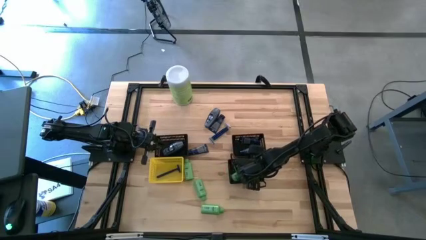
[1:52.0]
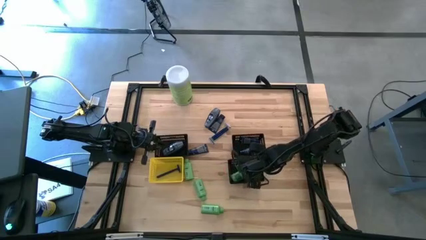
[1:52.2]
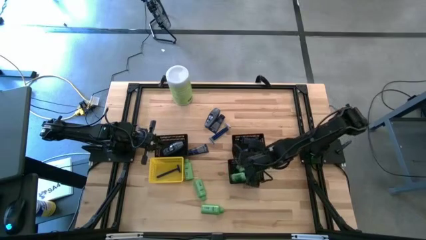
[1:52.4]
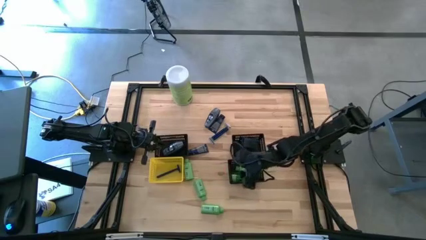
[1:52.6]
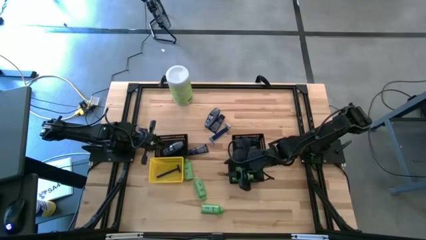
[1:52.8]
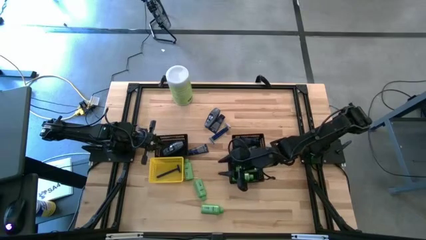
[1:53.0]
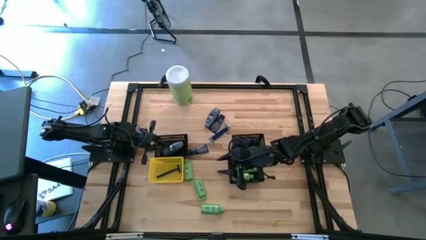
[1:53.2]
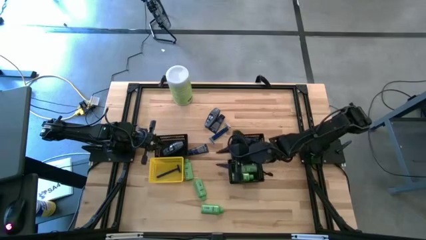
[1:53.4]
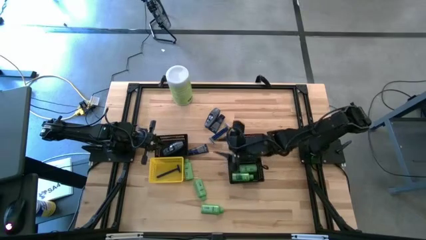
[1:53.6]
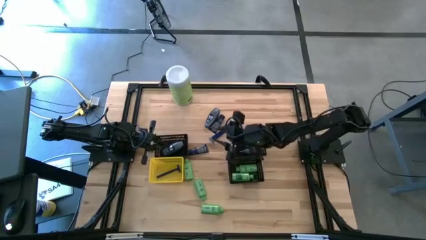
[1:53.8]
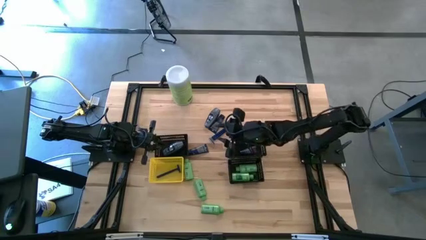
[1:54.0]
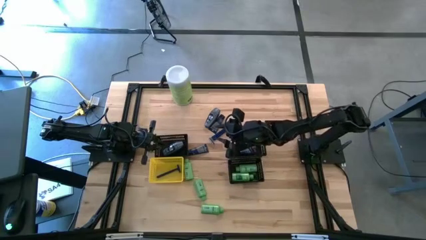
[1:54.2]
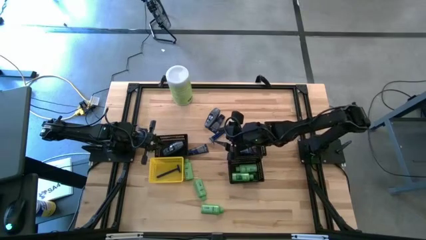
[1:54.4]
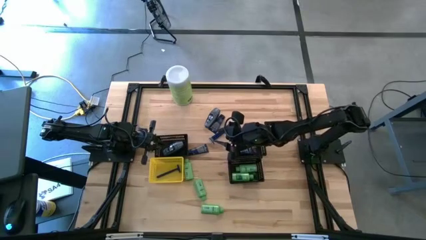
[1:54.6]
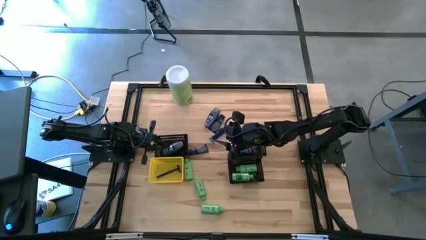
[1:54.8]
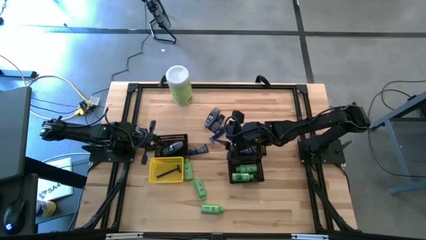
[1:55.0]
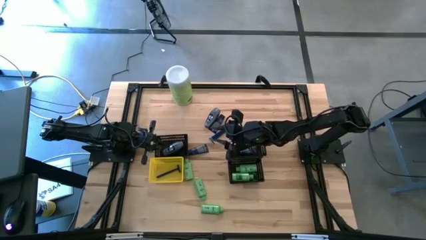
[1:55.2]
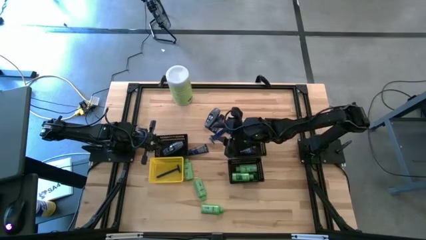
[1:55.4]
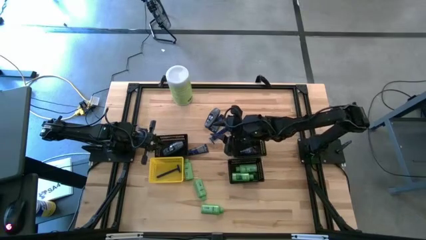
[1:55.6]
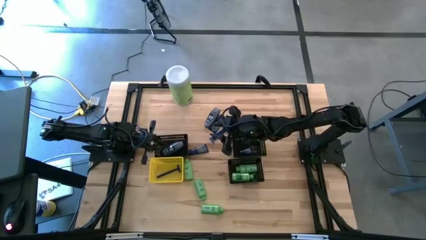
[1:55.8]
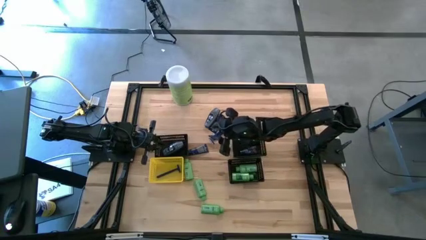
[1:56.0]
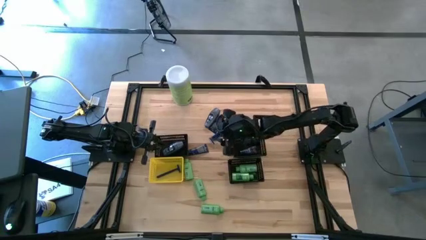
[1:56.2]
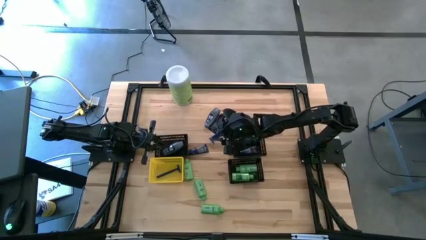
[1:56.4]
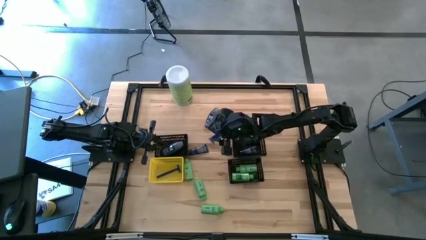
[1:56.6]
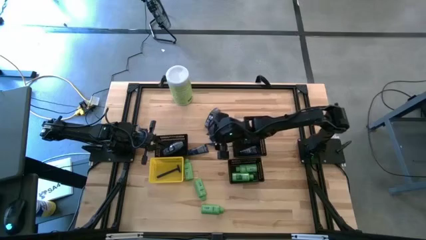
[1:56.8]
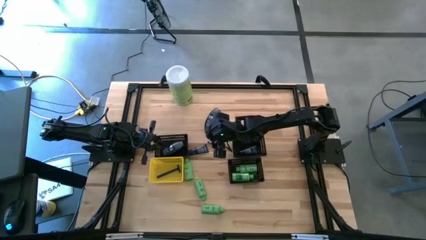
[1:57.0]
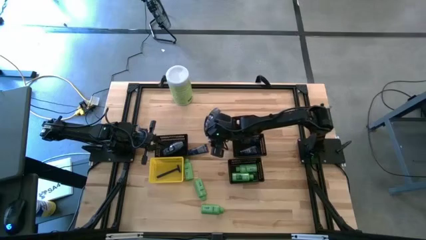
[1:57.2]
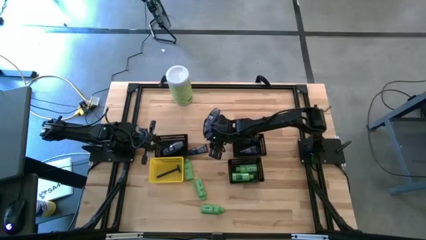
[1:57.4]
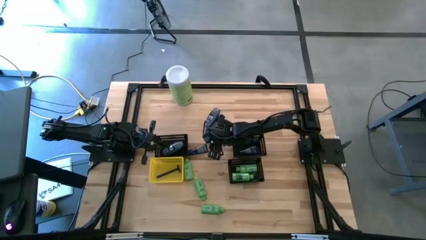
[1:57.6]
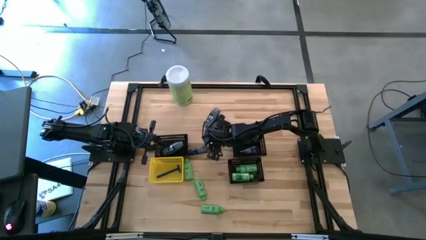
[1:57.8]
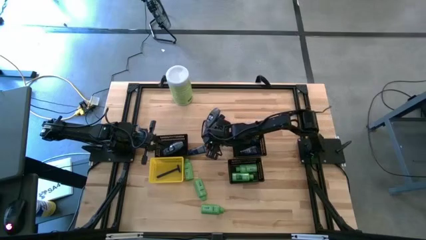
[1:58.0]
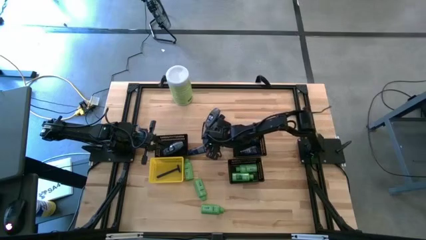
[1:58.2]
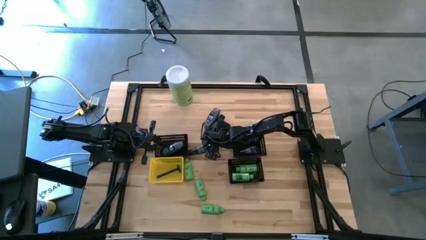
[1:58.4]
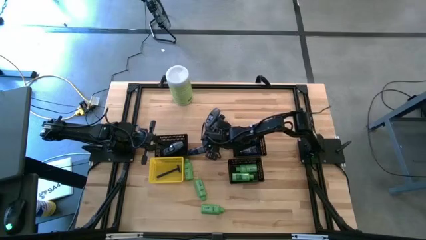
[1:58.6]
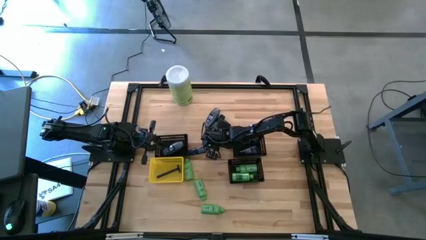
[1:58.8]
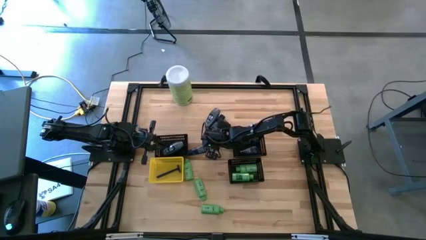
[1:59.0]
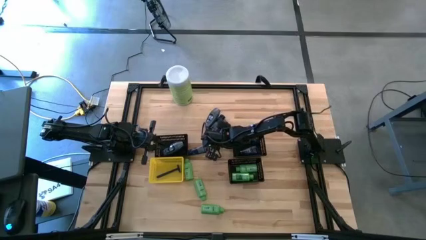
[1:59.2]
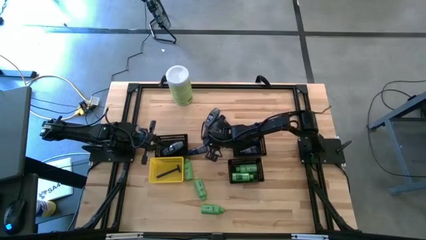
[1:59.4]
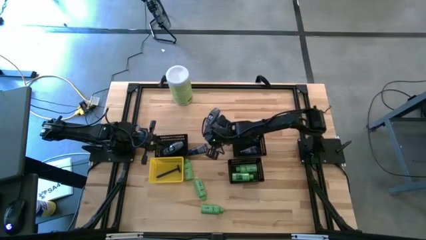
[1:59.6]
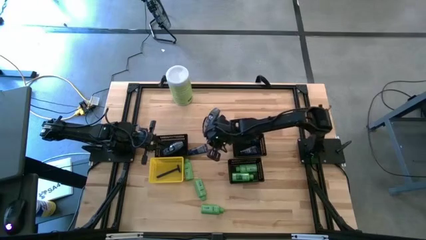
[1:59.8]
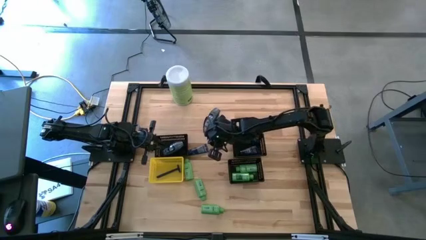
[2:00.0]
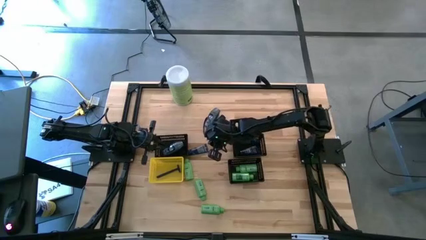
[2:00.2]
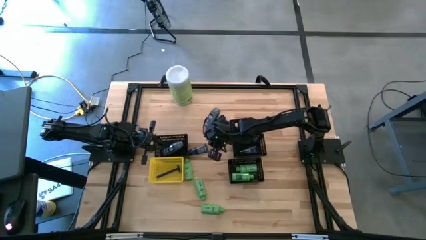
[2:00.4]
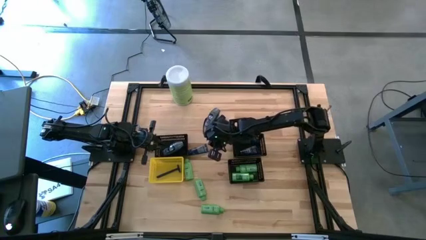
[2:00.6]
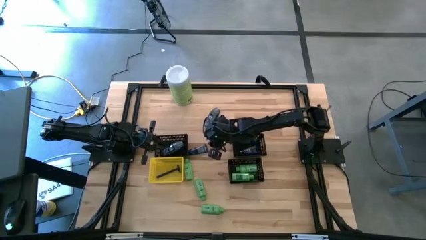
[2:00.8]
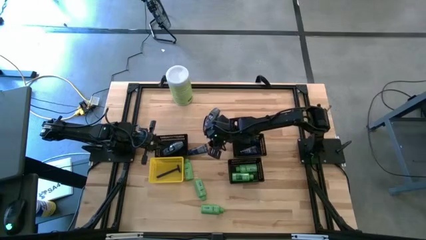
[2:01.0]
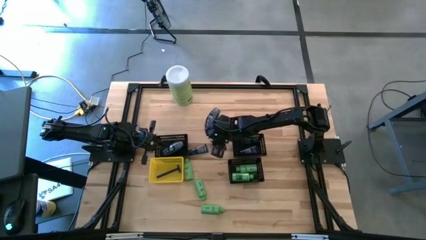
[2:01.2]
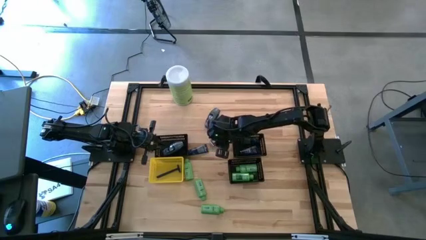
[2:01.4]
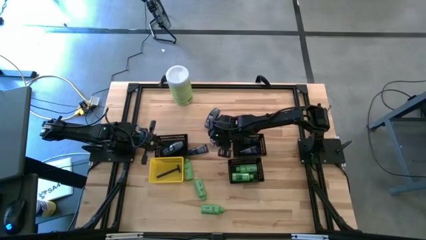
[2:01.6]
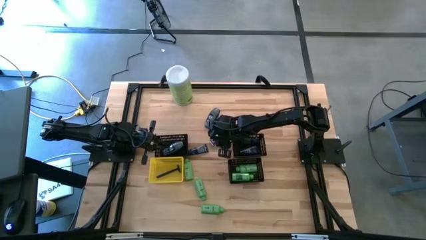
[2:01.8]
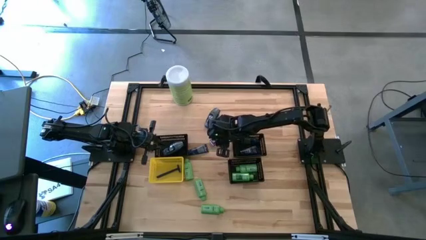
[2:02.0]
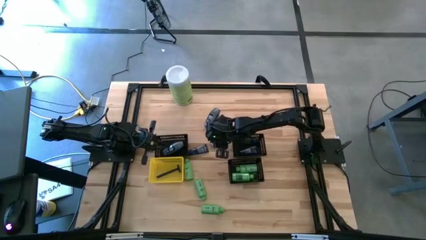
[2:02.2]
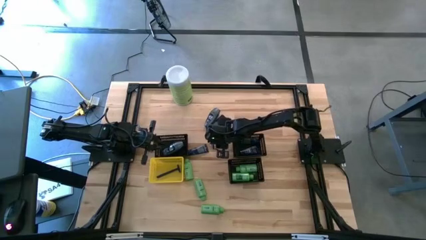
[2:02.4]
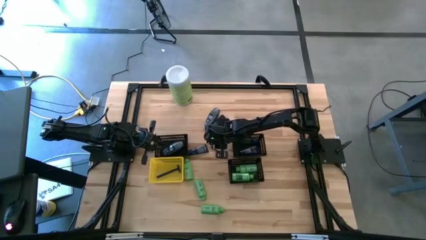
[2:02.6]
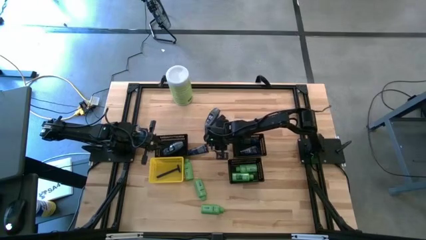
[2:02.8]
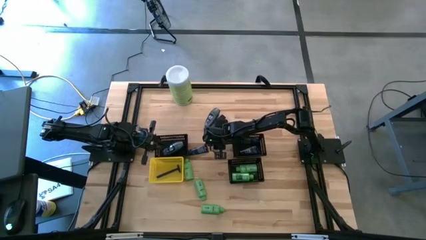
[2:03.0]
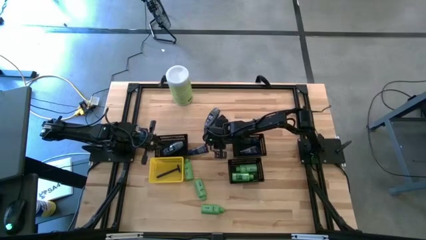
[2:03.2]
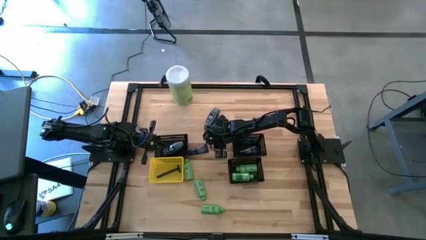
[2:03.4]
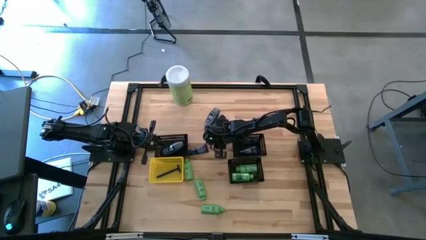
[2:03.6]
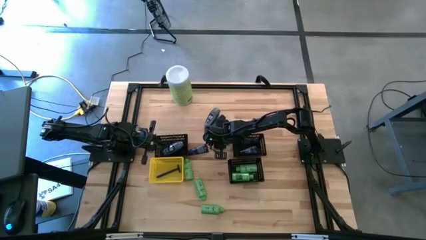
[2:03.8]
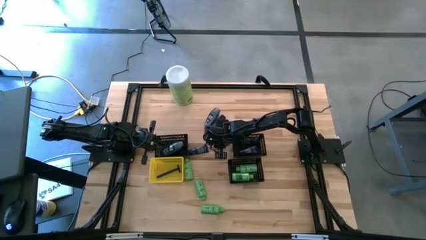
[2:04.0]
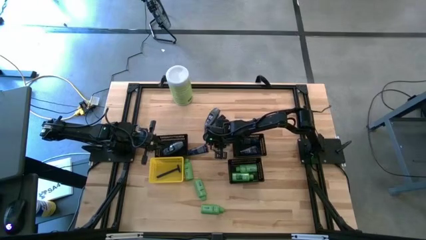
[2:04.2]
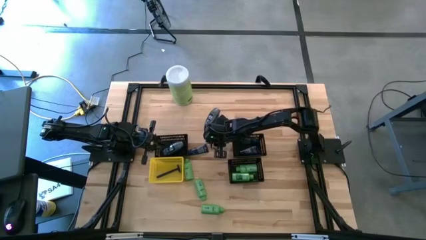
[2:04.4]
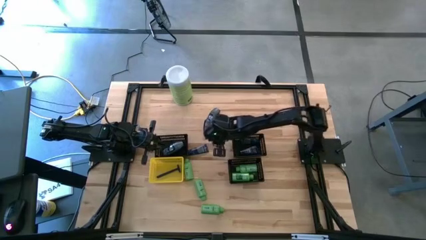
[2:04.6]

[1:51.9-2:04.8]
Task: Pick & Place Travel size toiletries
Put the bottom blue razor into the yellow bin
